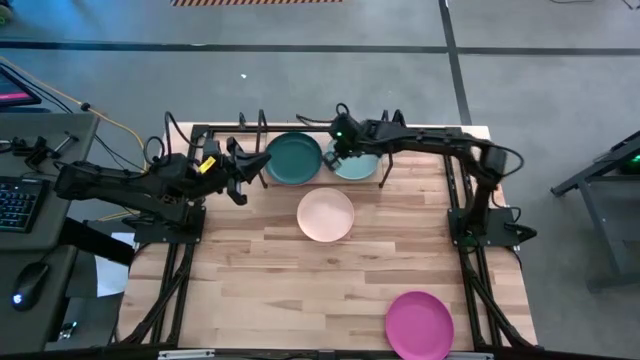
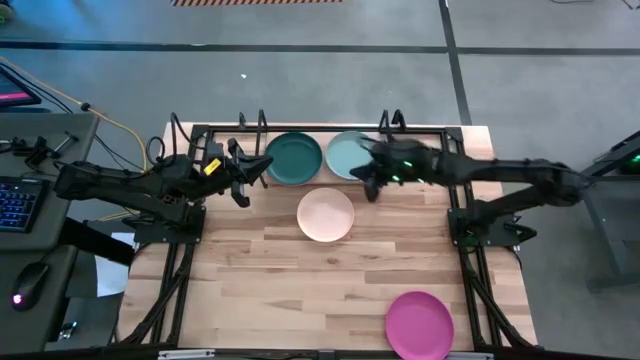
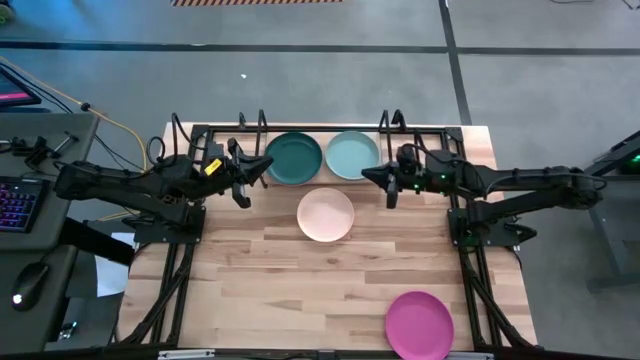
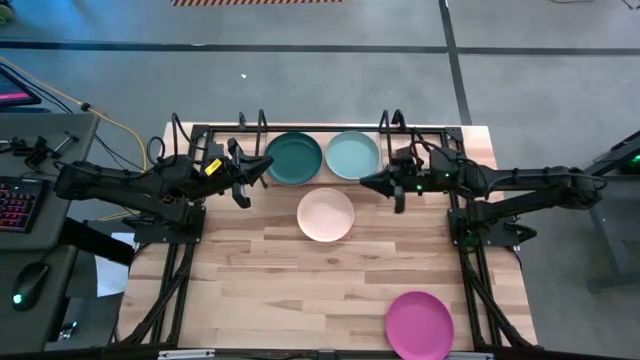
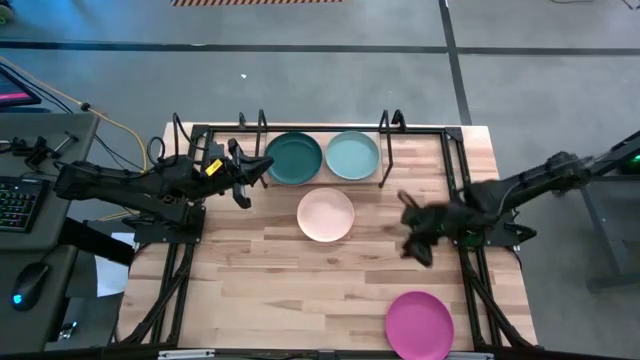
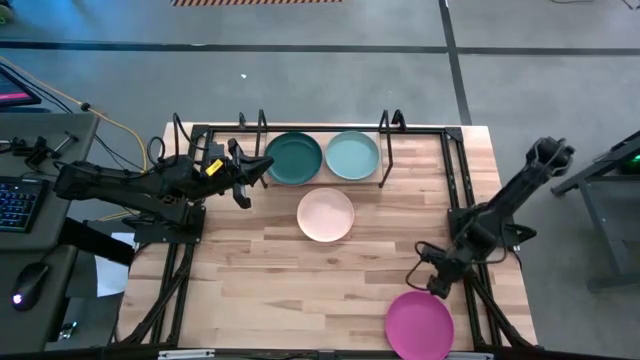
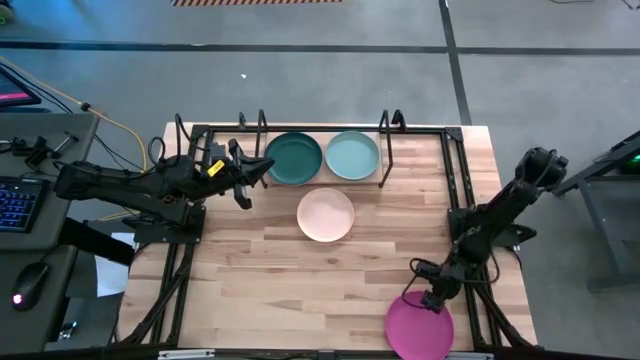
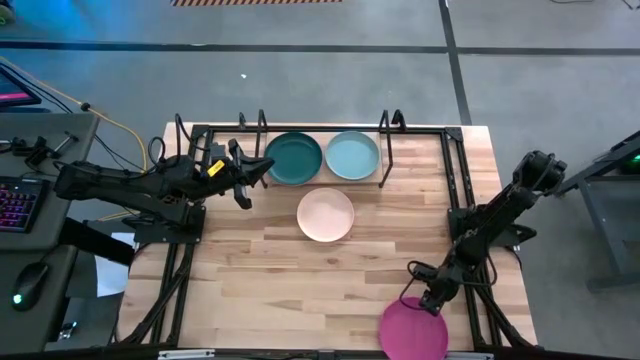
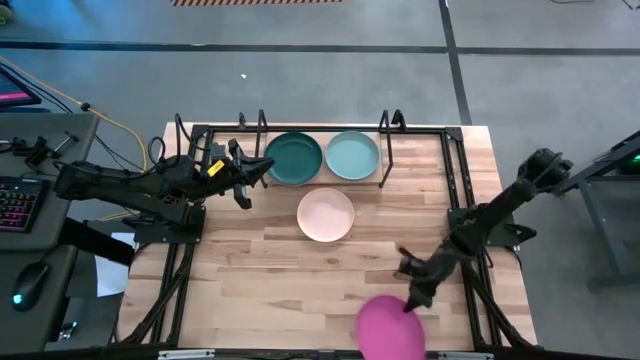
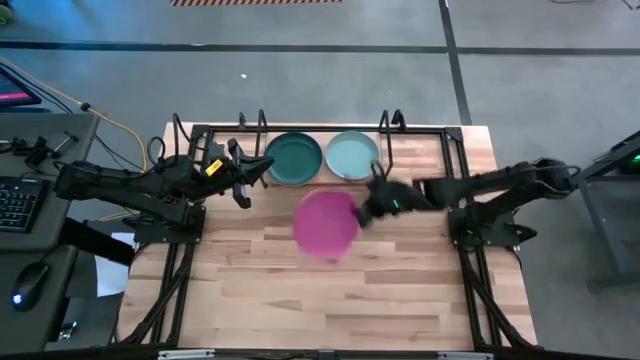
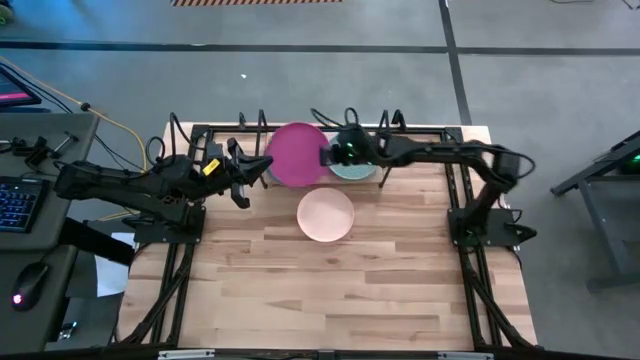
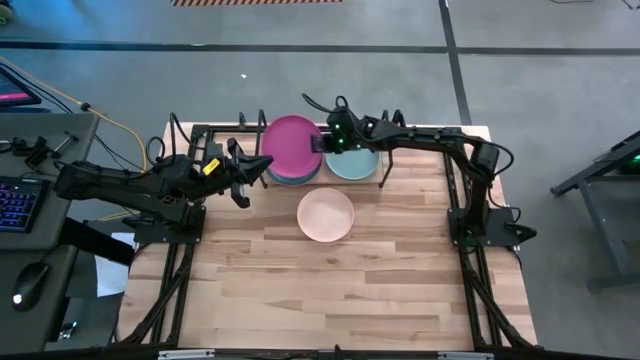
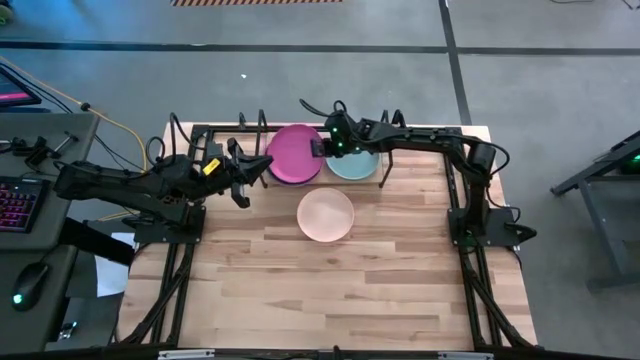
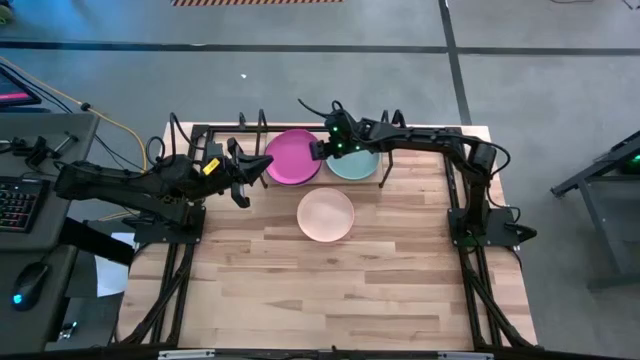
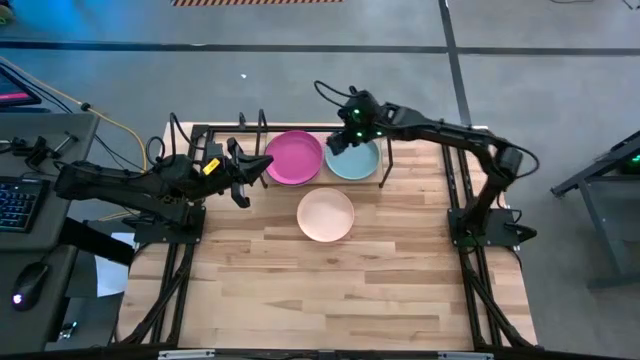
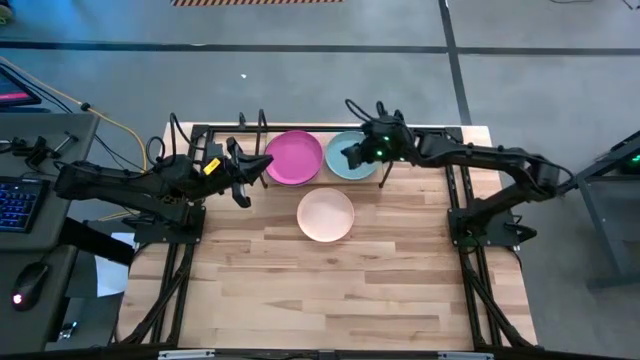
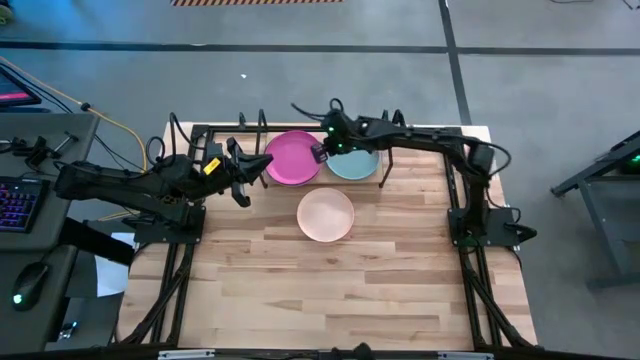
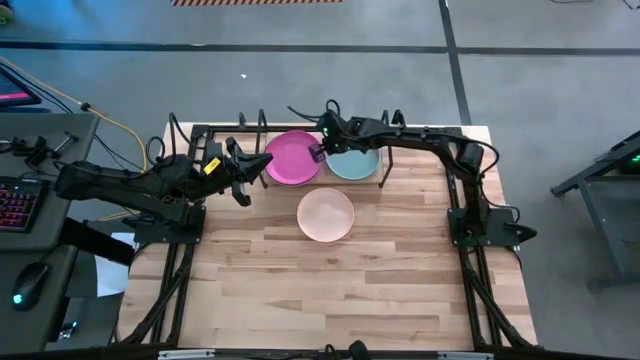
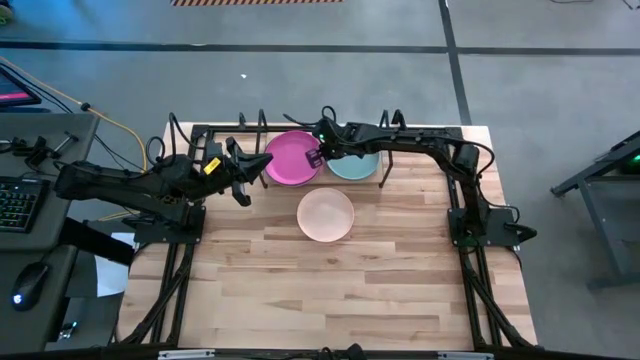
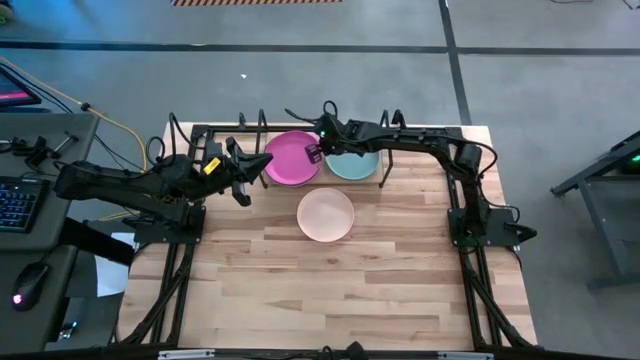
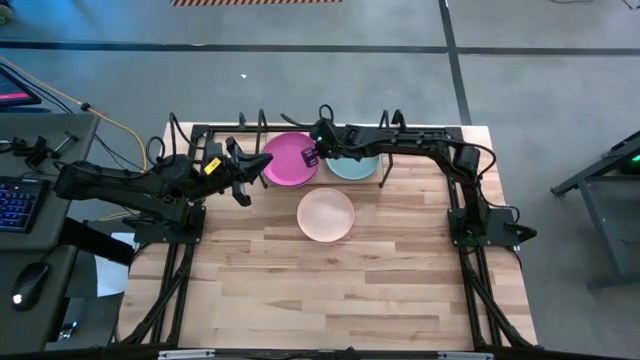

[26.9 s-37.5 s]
Task: Place and stack plates onto a shelf
Stack the dark pink plate on the dark green plate on the shelf

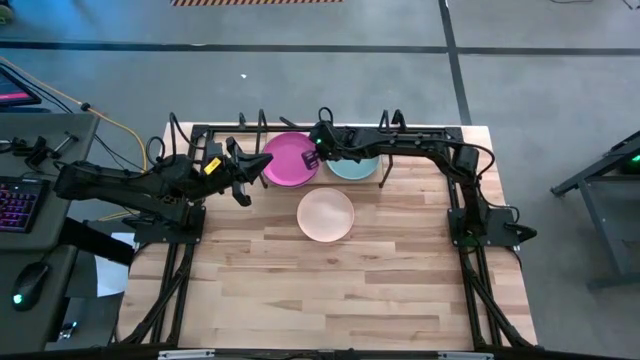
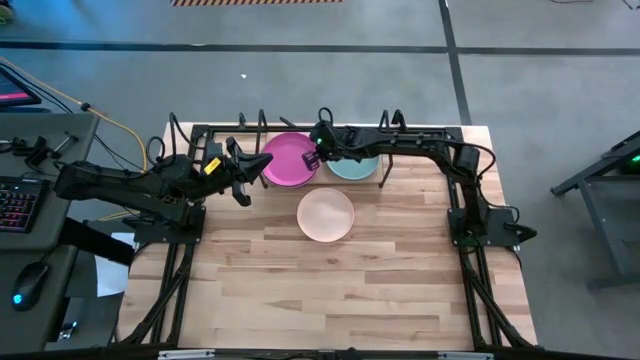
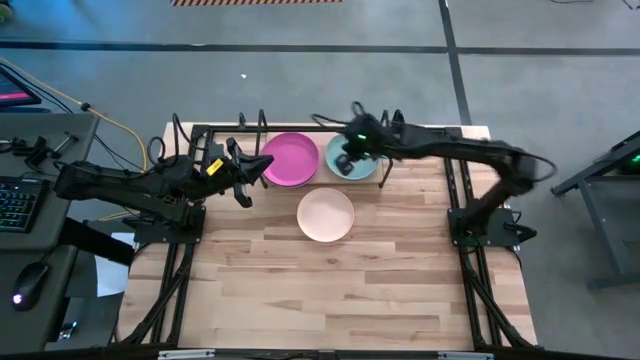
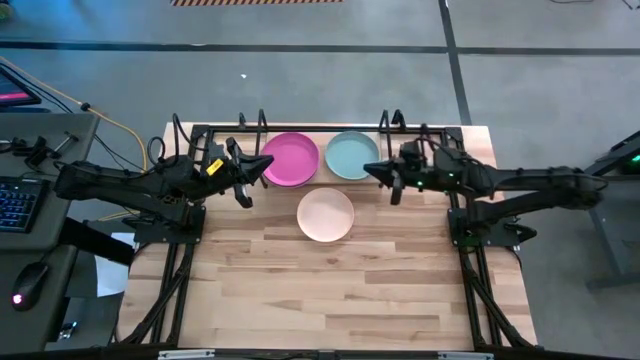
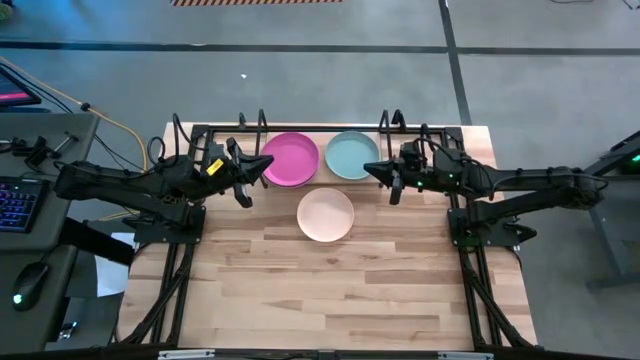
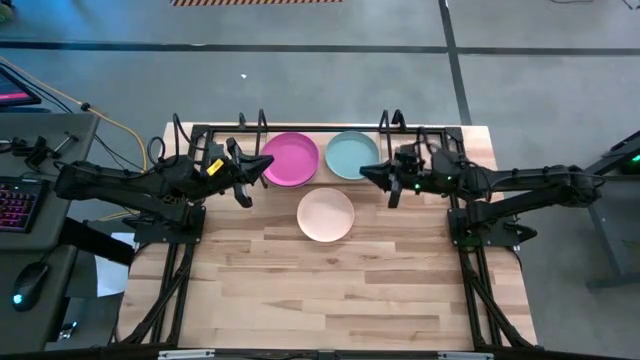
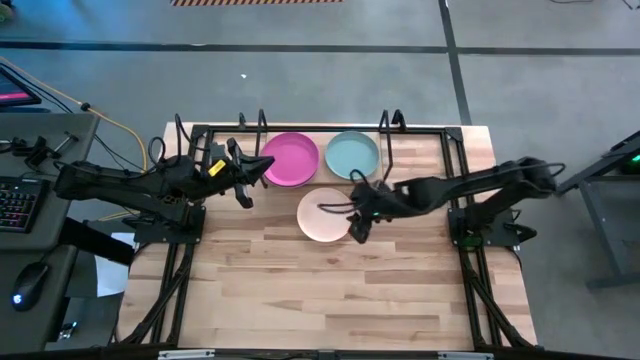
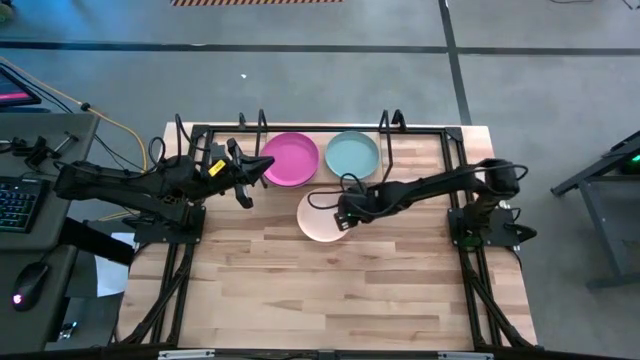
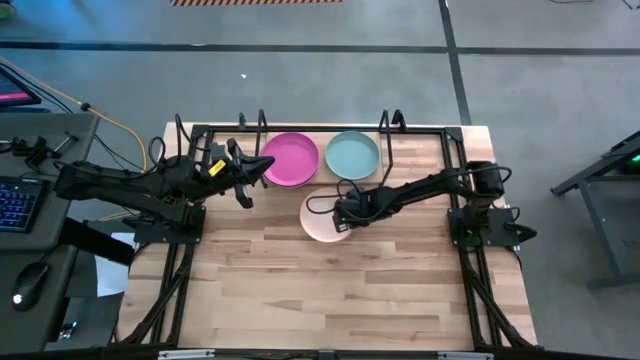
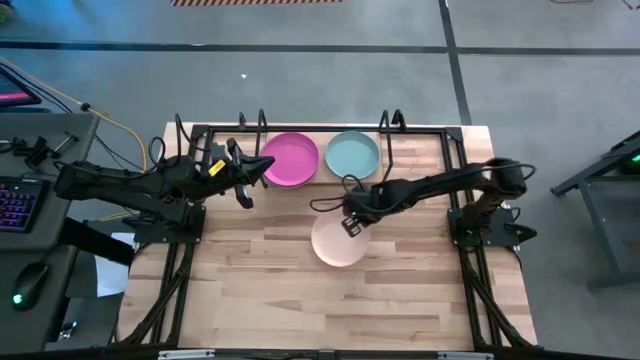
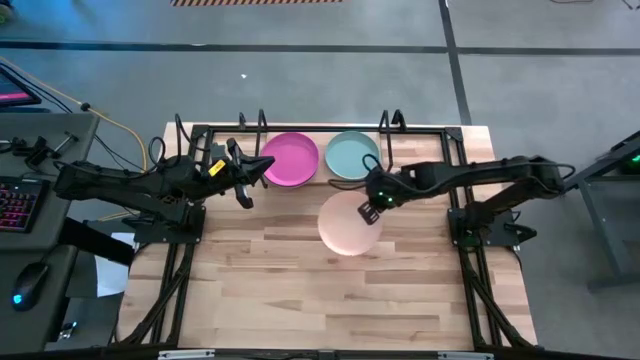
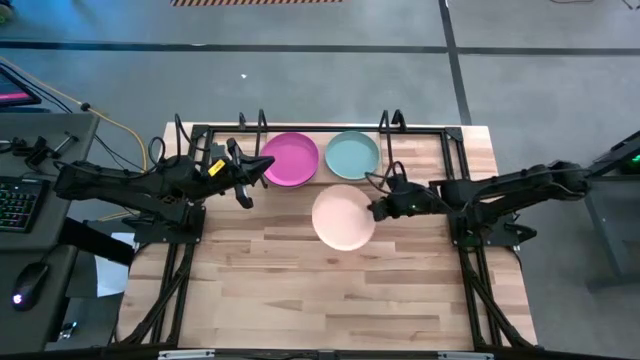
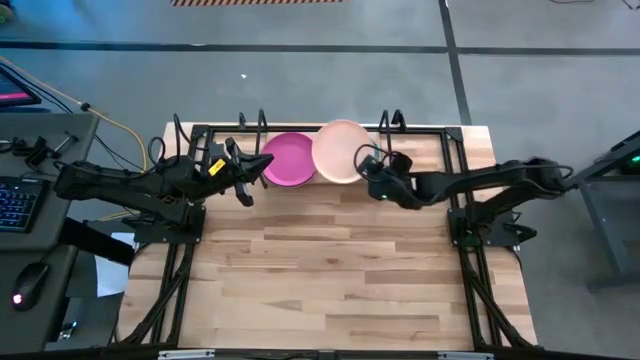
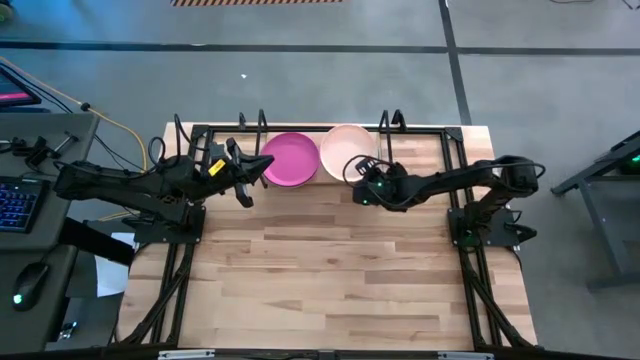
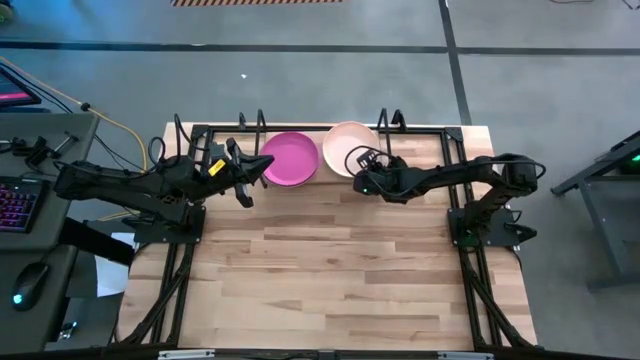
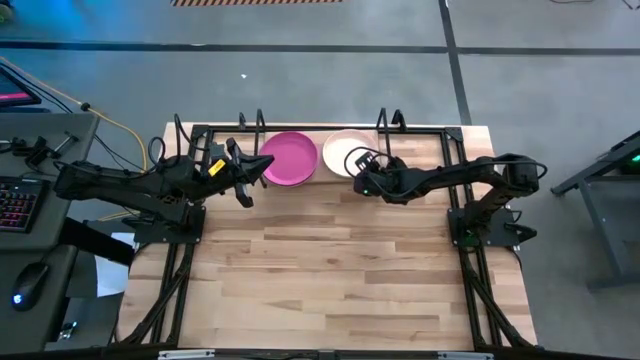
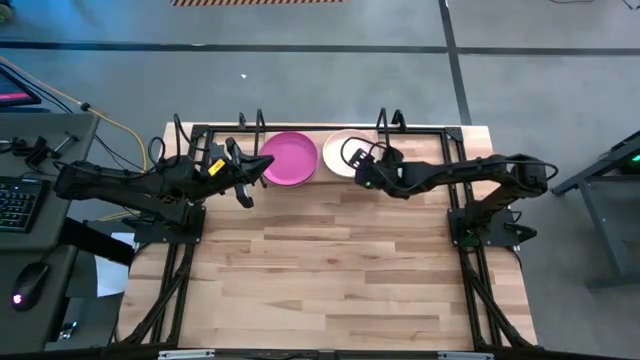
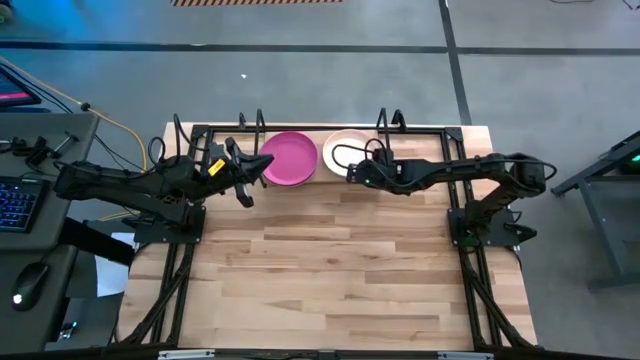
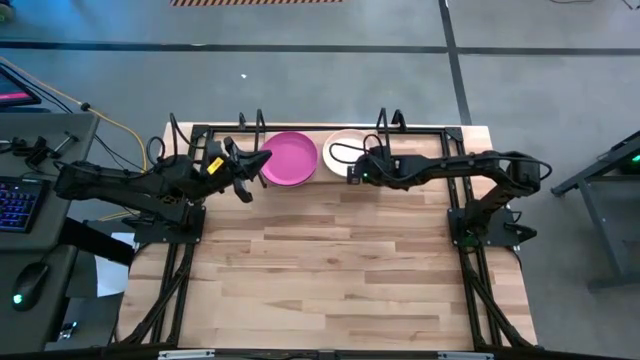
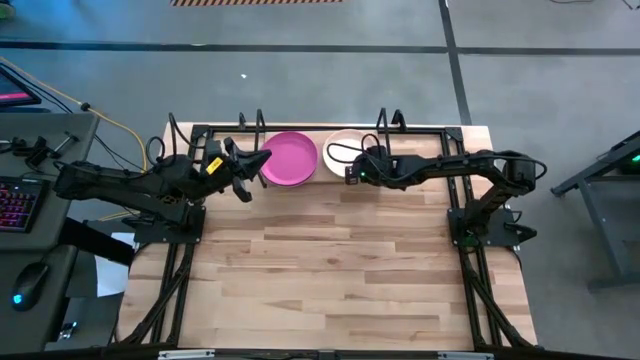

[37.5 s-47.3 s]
Stack the light orange plate on the light blue plate on the shelf

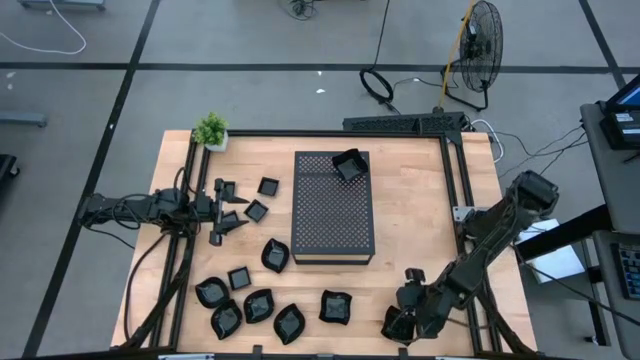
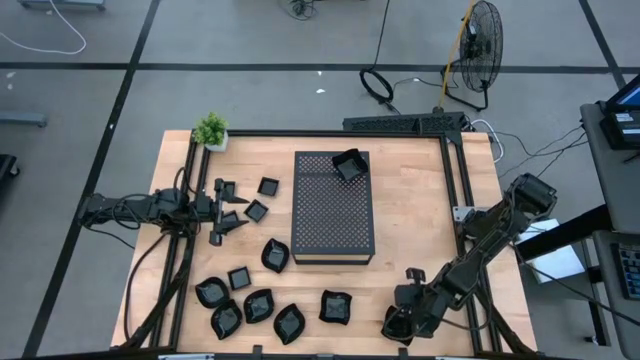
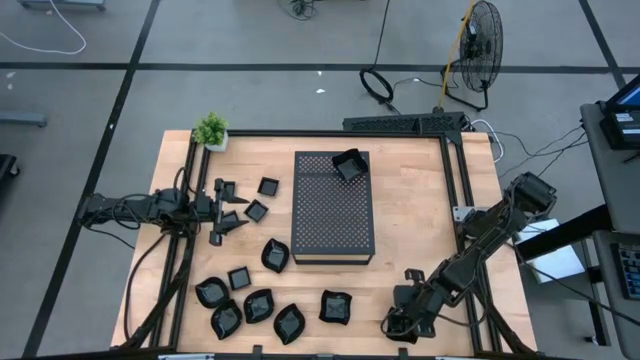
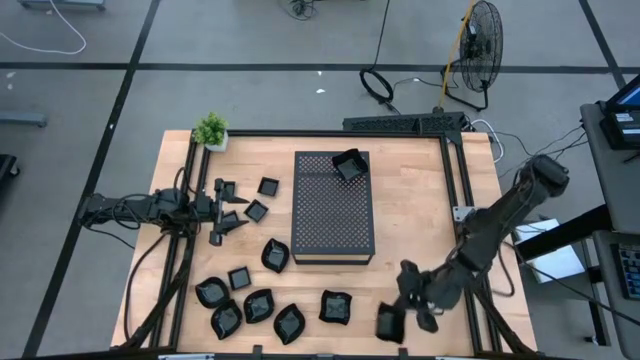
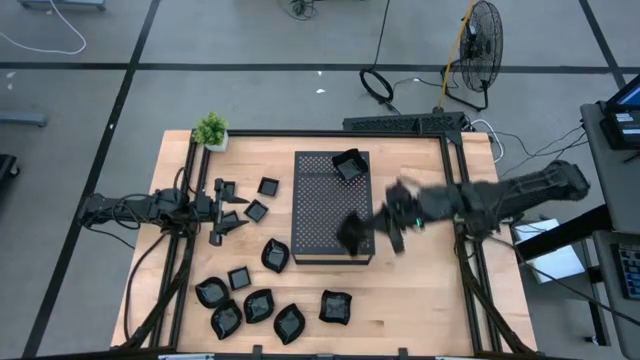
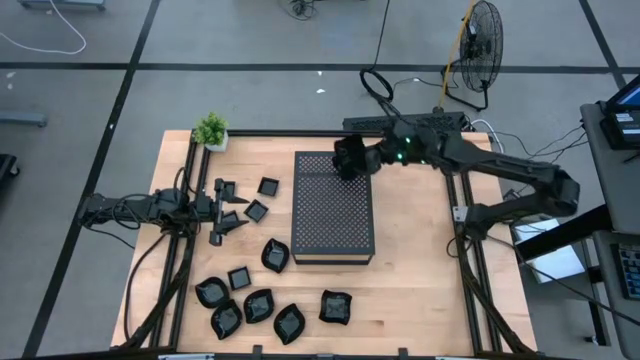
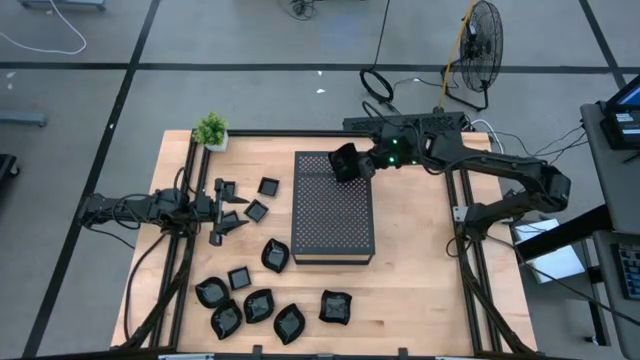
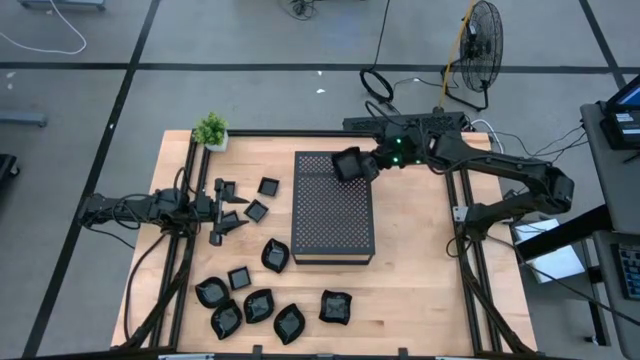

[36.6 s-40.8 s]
Task: Pick & Place Mini shaped plates
Stack the black distorted square plate on top of the black distorted square plates on the shelf
